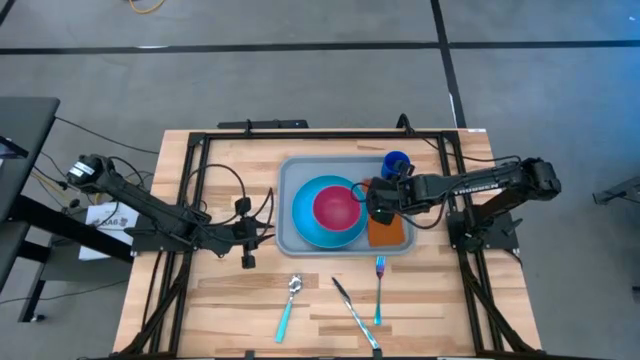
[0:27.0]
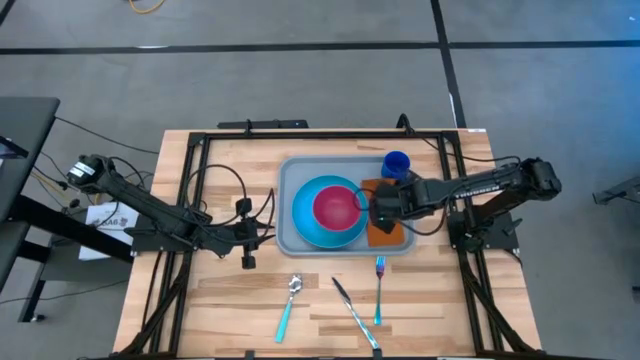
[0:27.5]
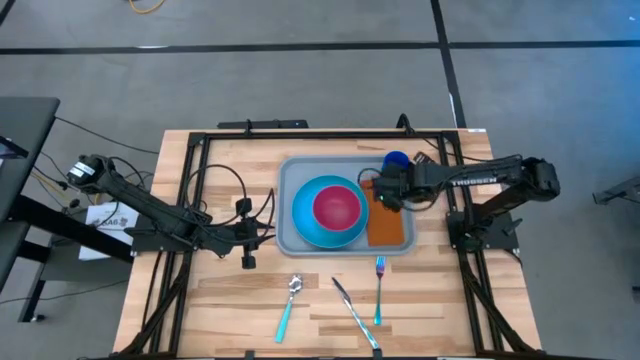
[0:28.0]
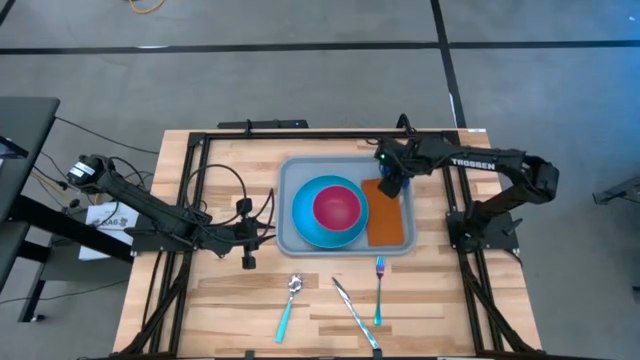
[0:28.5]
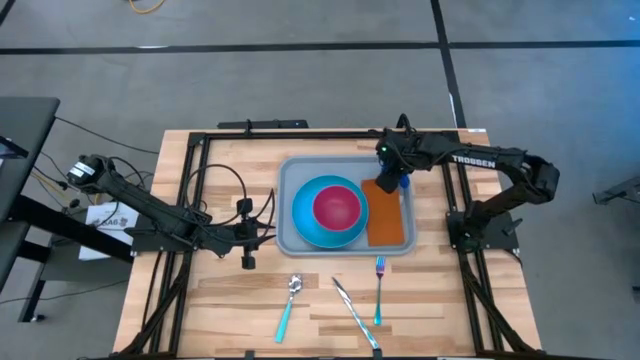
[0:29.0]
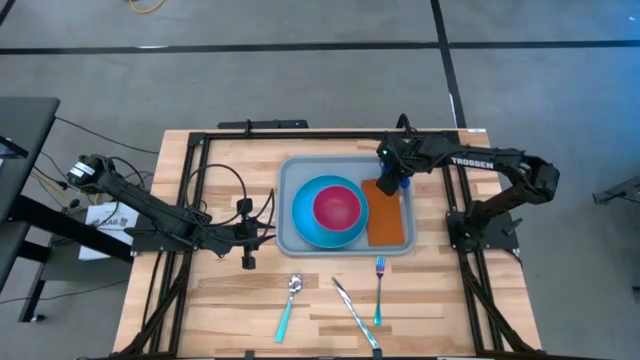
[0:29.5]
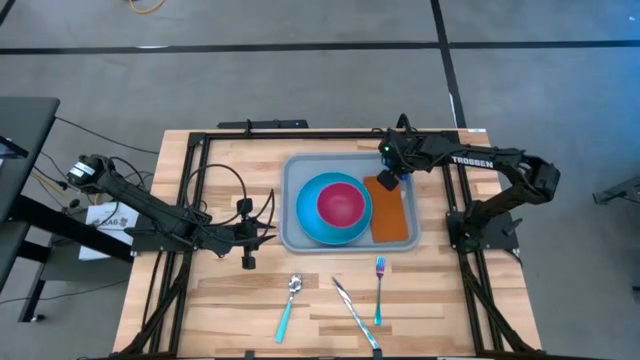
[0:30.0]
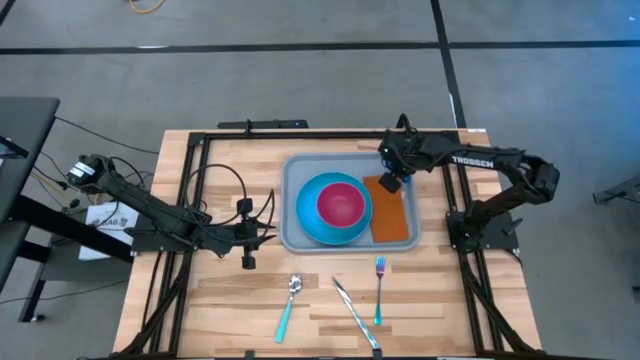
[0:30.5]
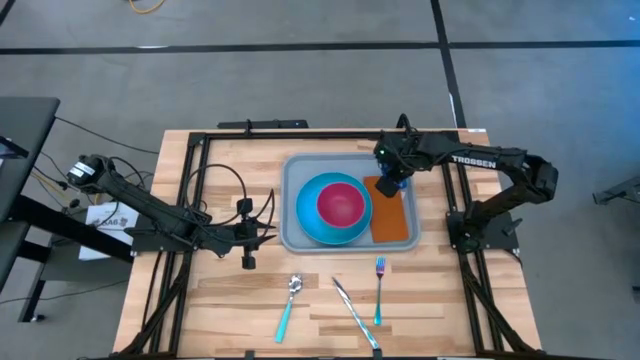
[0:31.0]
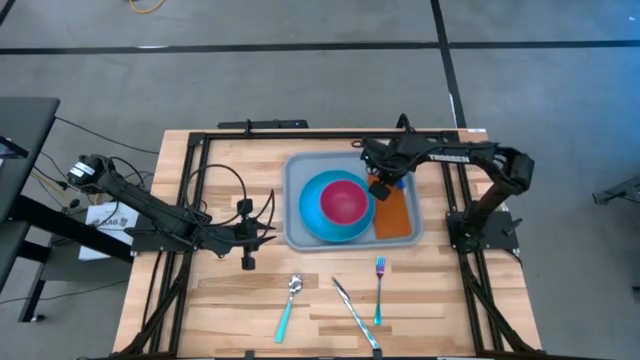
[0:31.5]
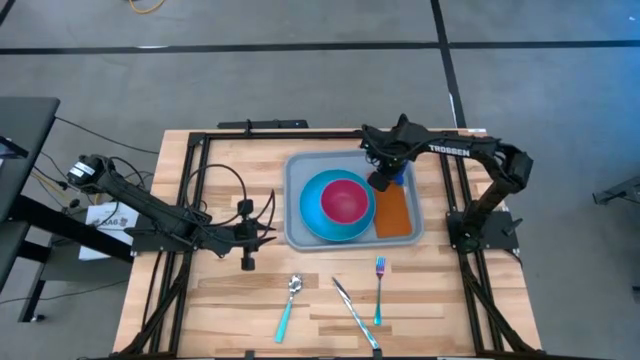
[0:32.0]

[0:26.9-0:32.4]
Task: Set up tray
Adjust the blue cup

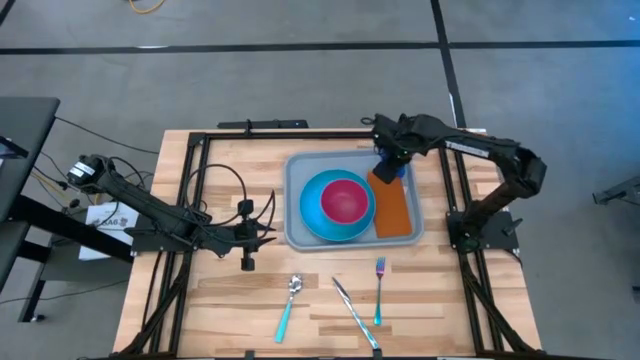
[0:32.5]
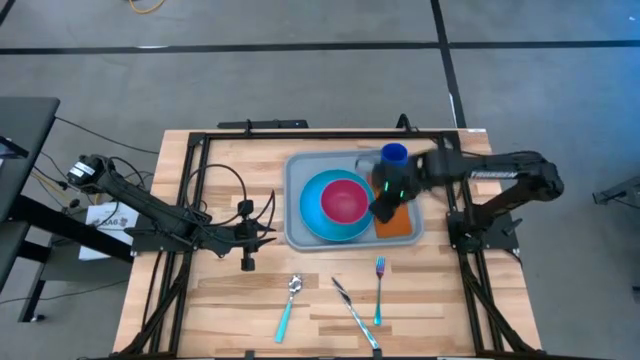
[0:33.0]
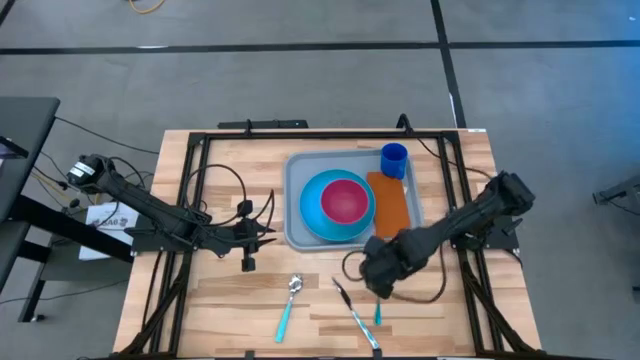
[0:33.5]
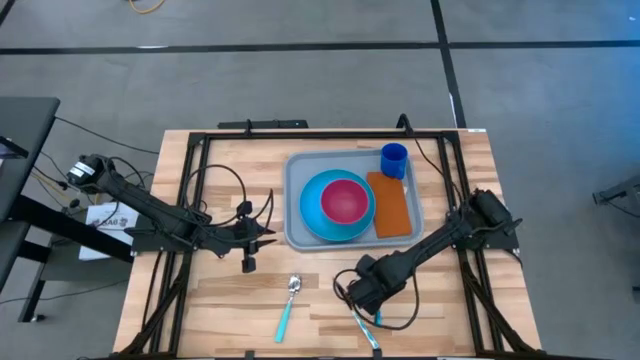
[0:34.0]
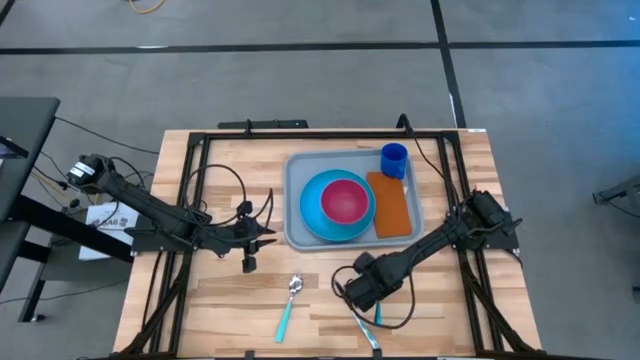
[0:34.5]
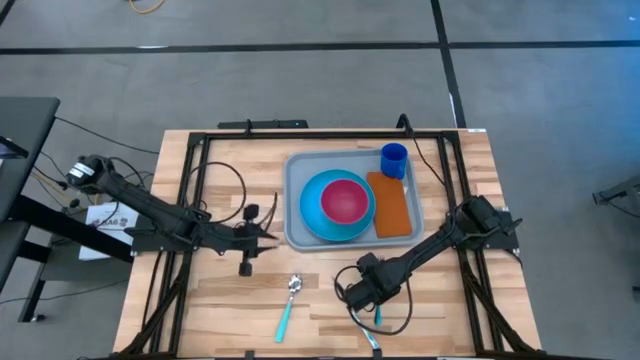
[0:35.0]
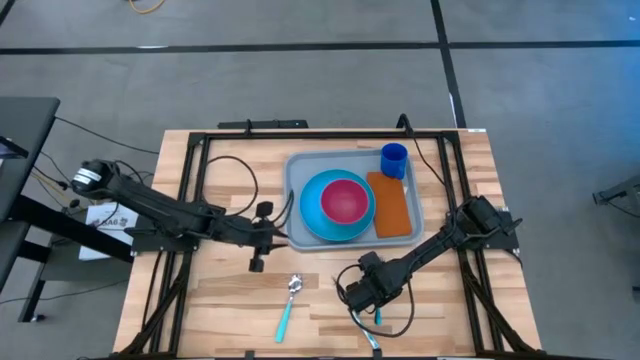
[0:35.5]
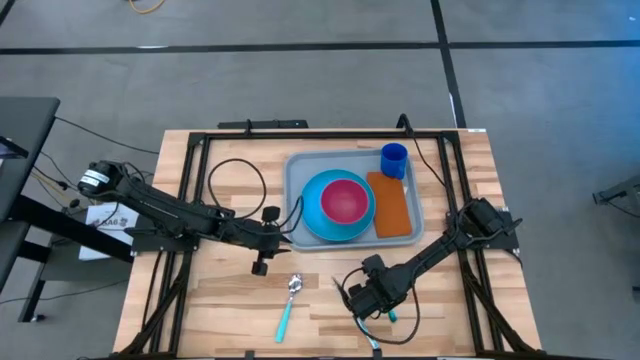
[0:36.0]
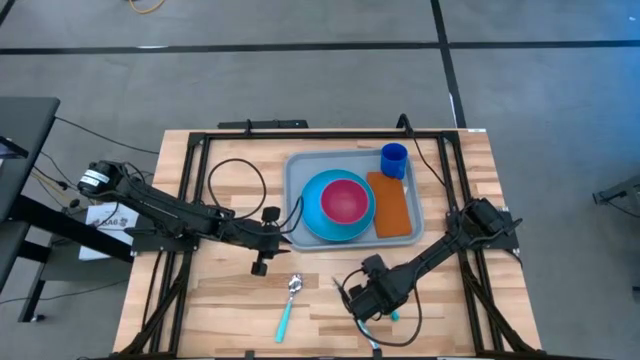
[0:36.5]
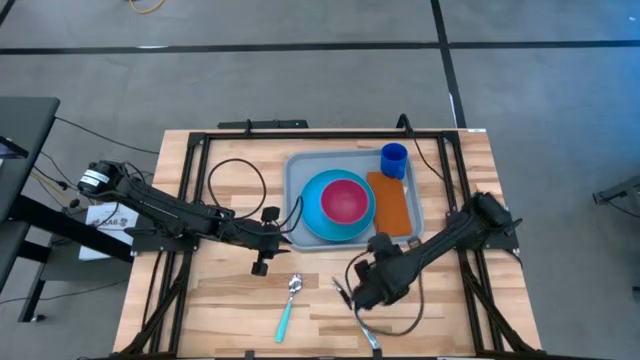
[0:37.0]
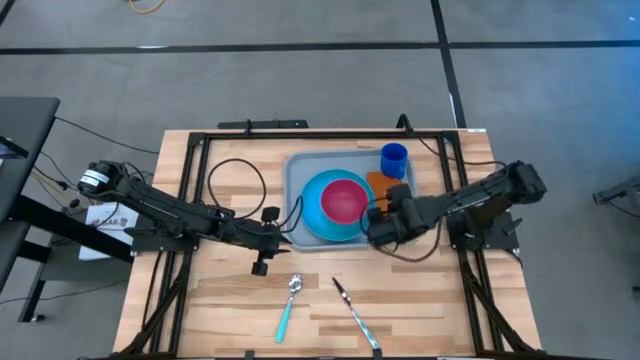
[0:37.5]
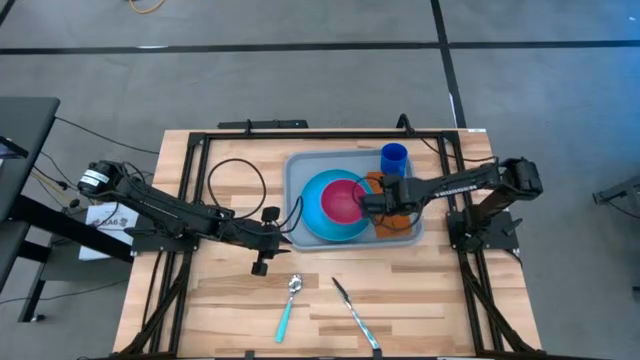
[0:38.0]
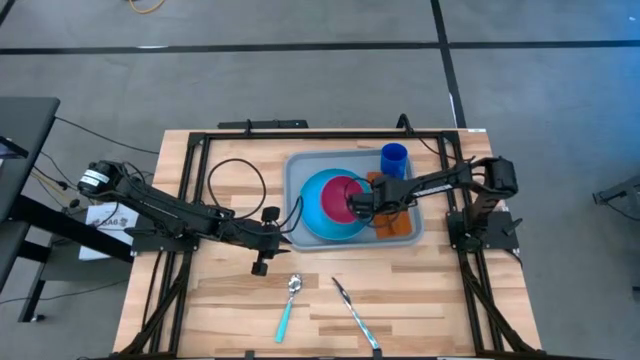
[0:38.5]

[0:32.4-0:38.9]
Put the blue fork on top of the brown napkin

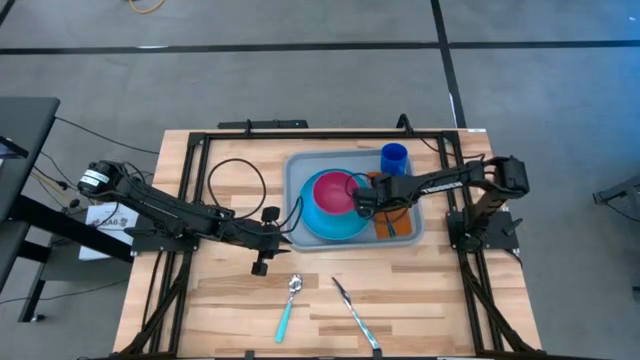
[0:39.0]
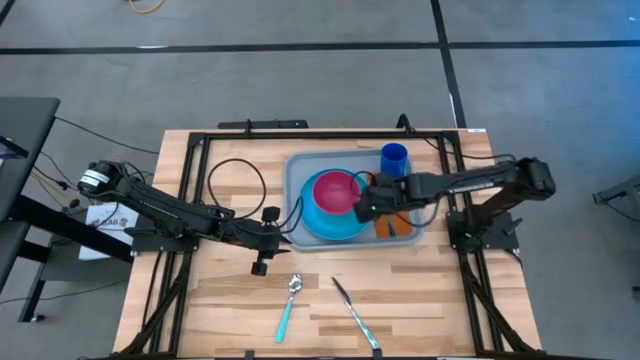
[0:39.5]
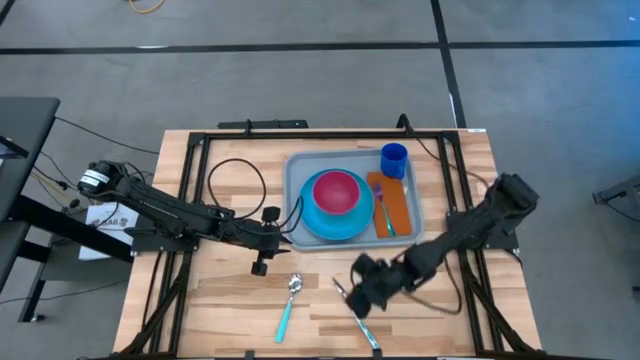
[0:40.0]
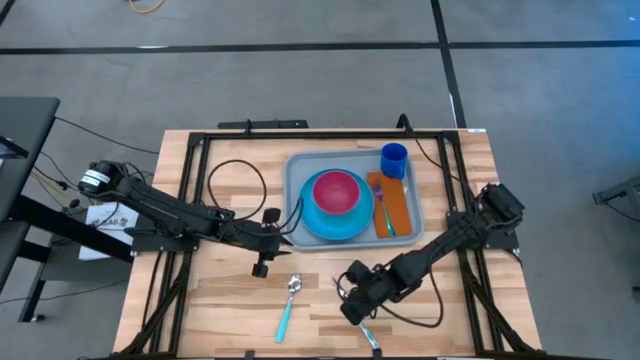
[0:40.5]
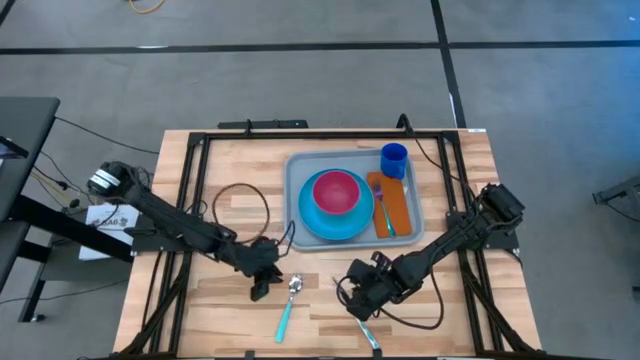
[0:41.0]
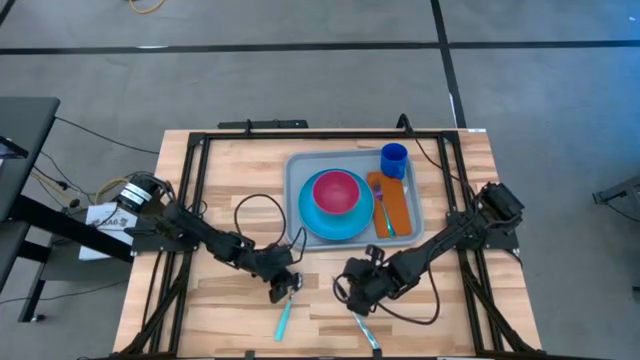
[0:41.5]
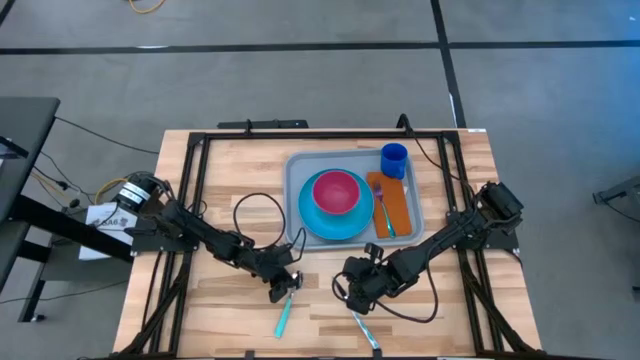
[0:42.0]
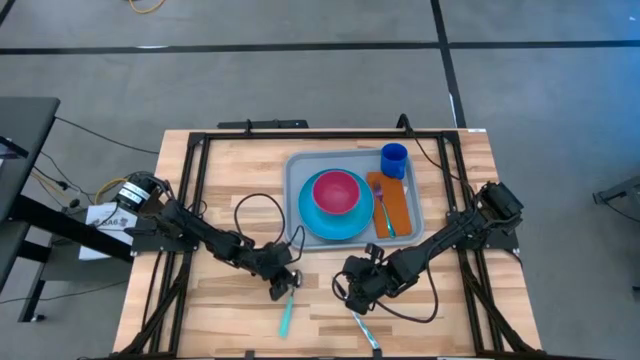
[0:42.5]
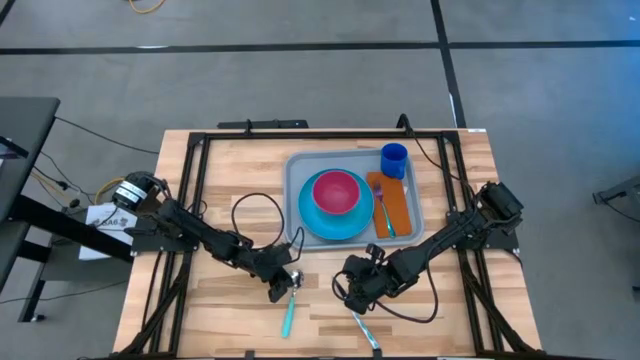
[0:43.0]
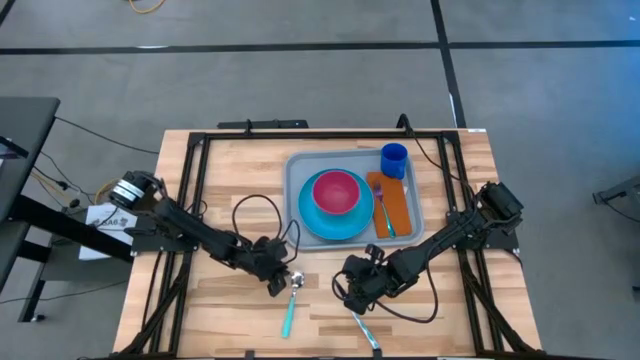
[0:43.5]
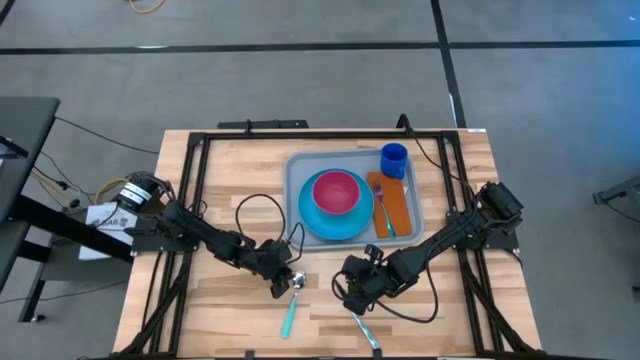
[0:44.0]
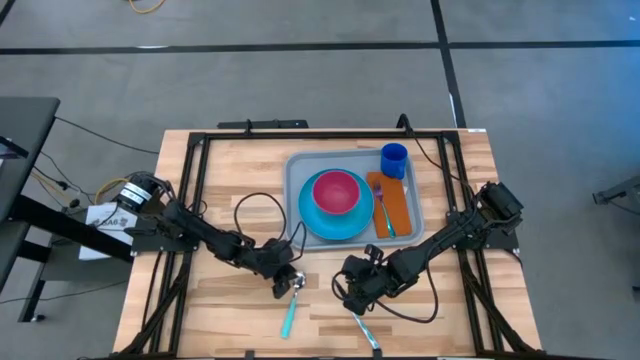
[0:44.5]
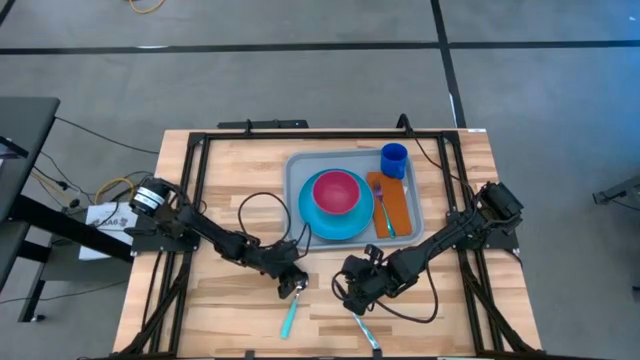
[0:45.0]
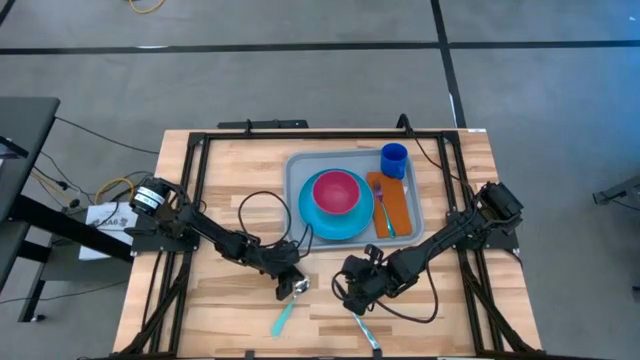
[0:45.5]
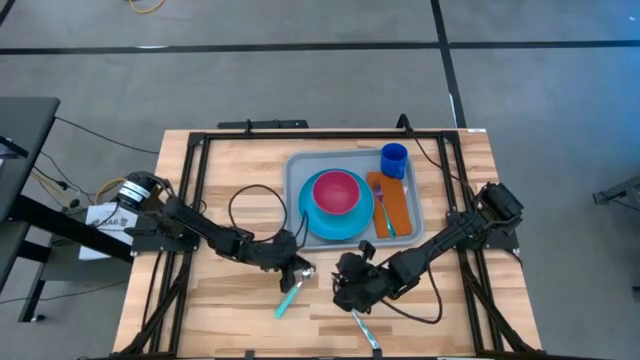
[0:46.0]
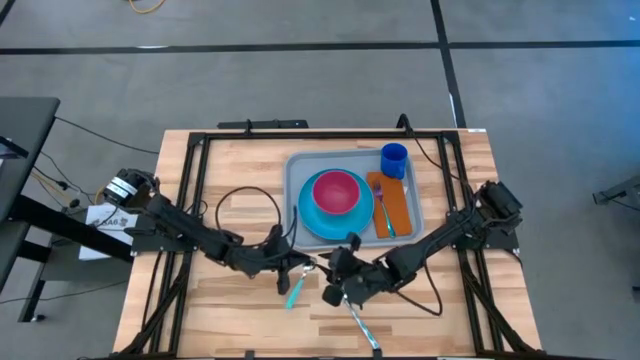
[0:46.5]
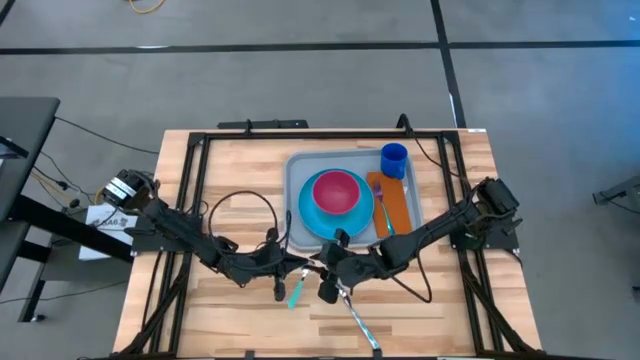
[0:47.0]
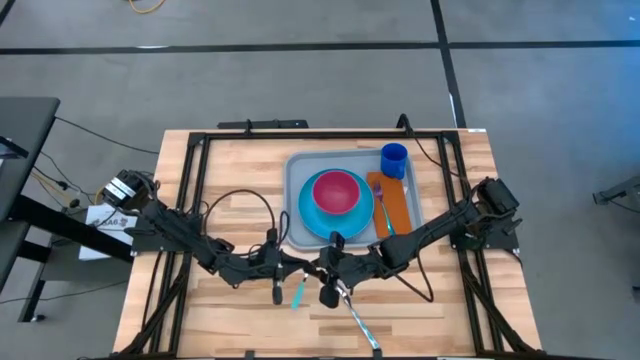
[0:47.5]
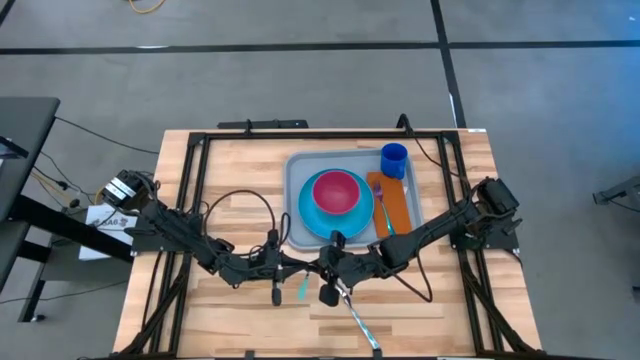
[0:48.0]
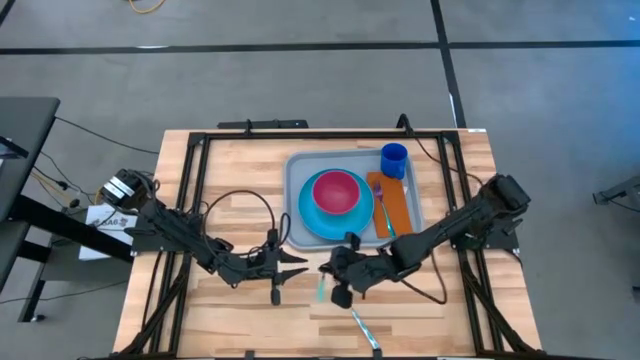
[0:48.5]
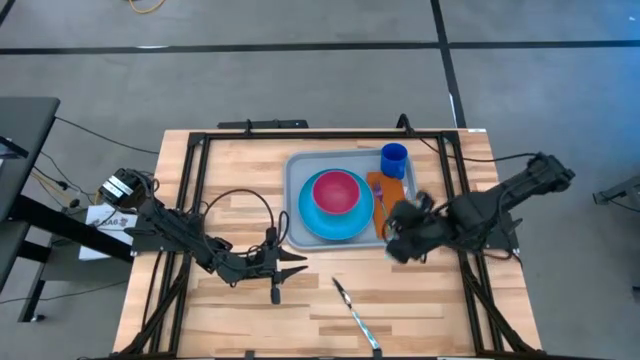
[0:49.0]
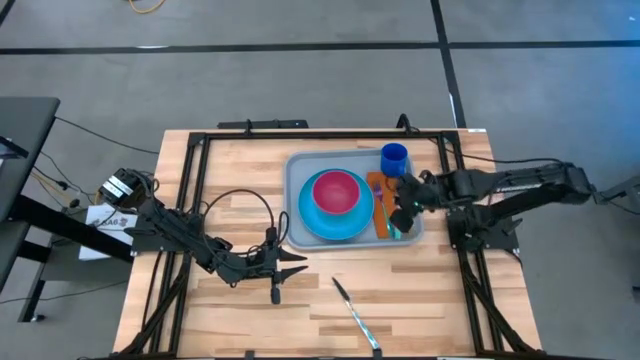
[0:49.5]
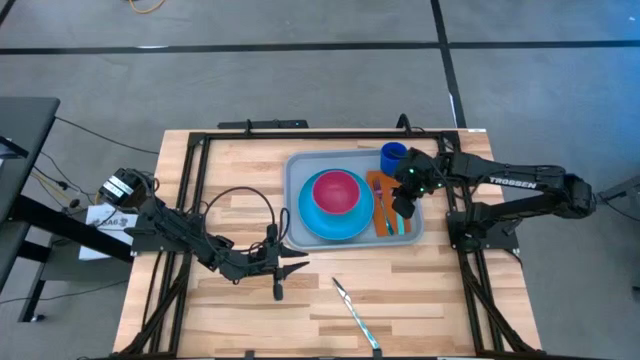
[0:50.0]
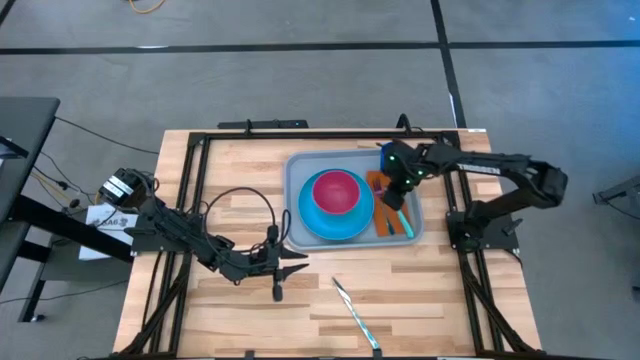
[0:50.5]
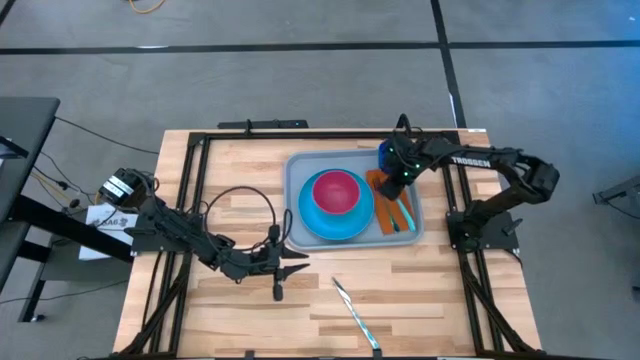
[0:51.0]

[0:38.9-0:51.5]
Put the blue spoon on top of the brown napkin to the right of the blue fork
